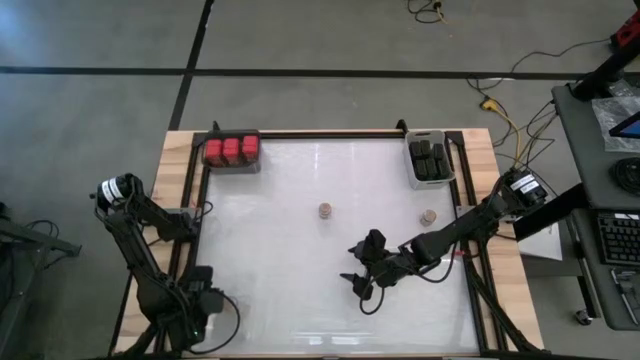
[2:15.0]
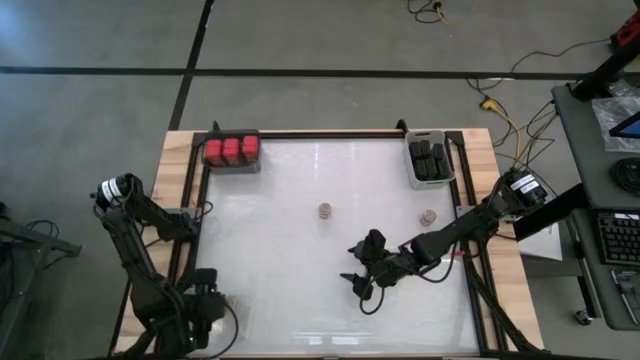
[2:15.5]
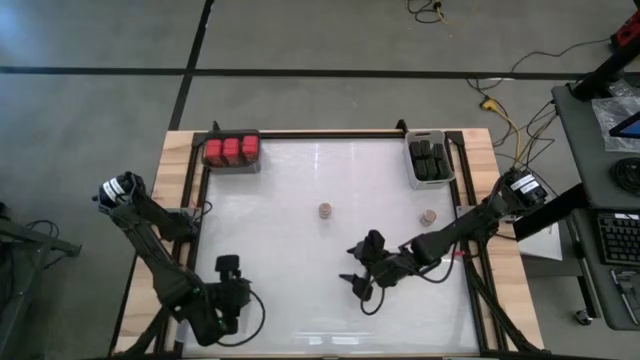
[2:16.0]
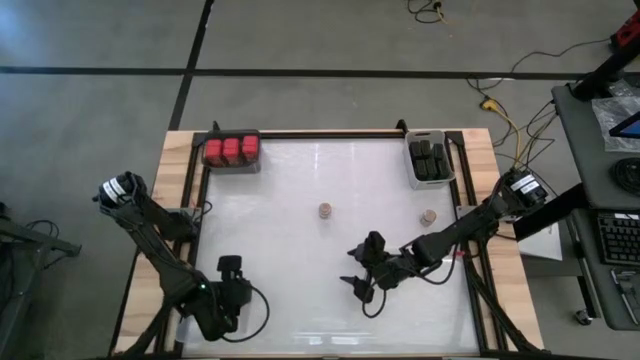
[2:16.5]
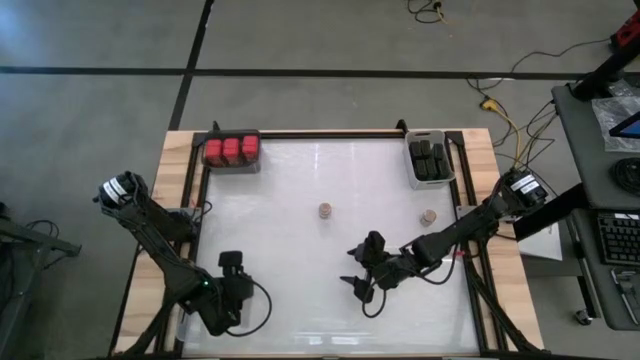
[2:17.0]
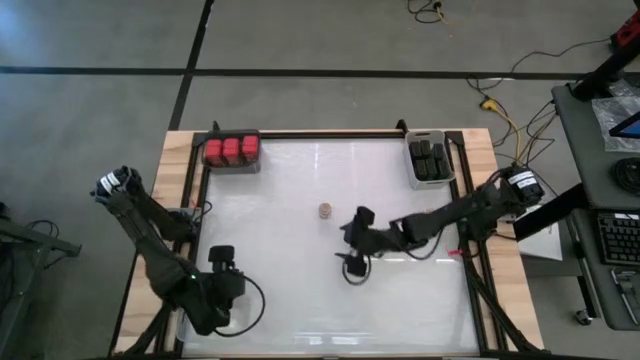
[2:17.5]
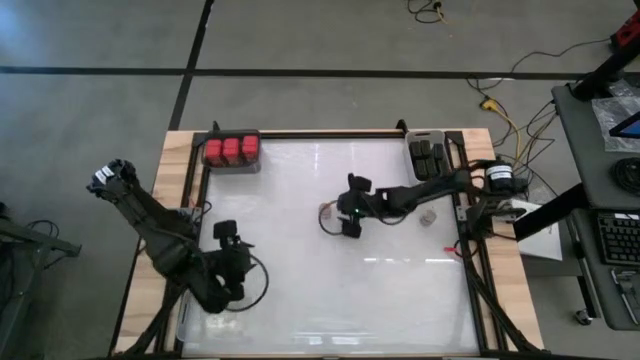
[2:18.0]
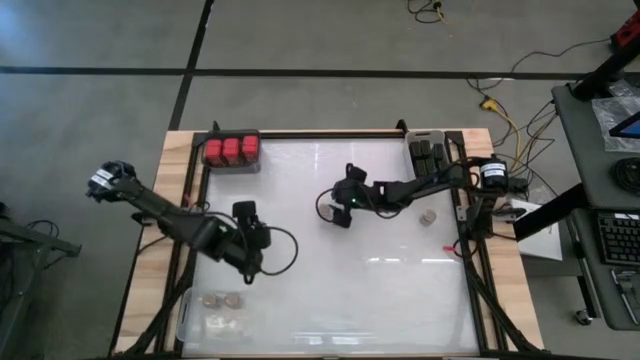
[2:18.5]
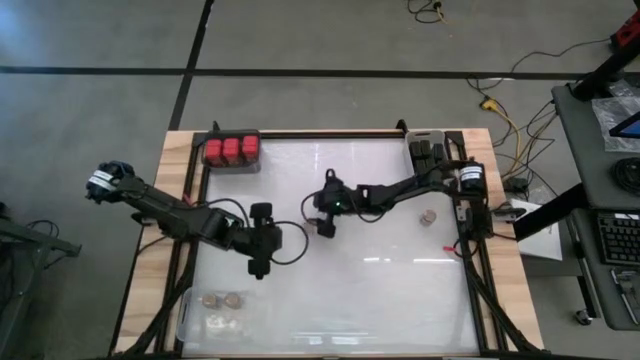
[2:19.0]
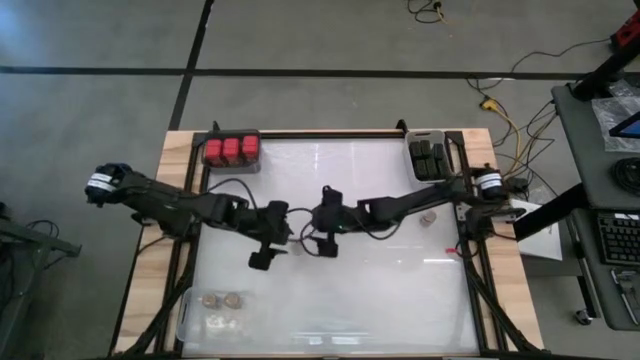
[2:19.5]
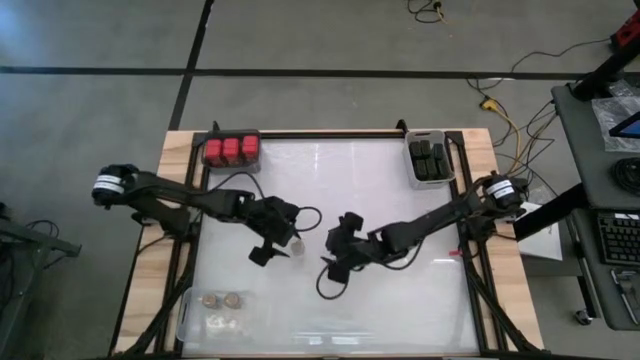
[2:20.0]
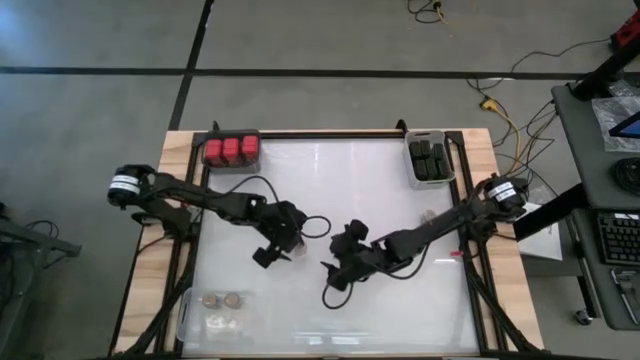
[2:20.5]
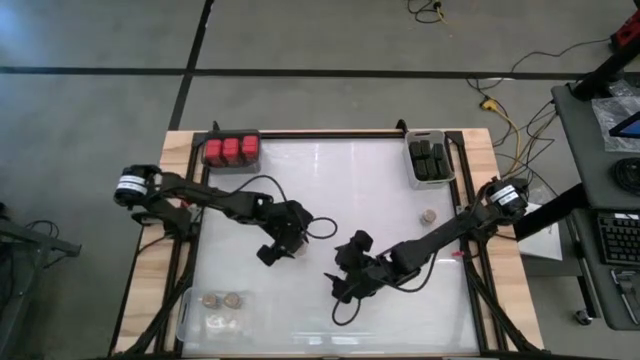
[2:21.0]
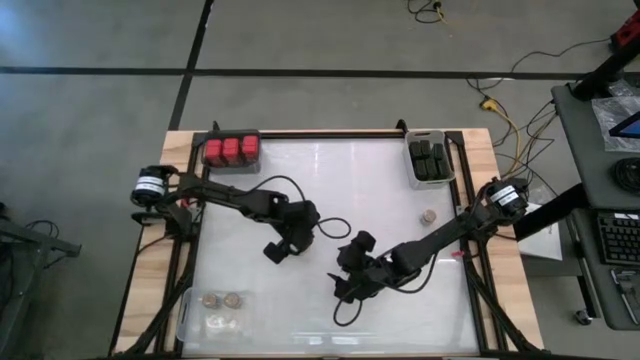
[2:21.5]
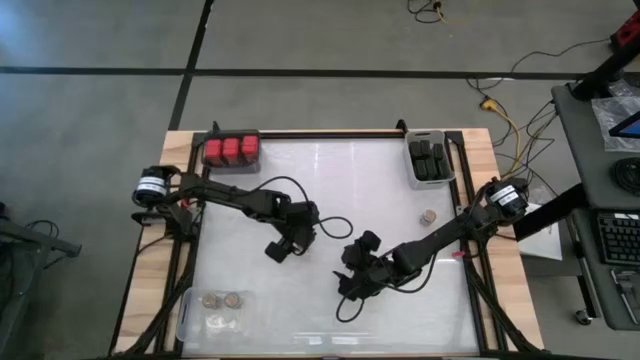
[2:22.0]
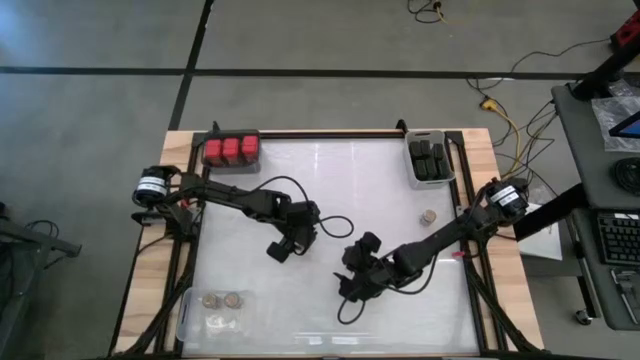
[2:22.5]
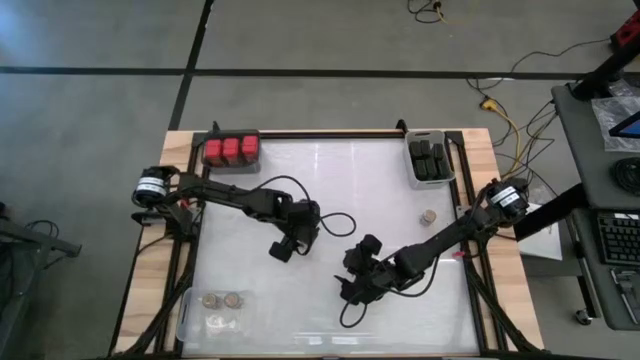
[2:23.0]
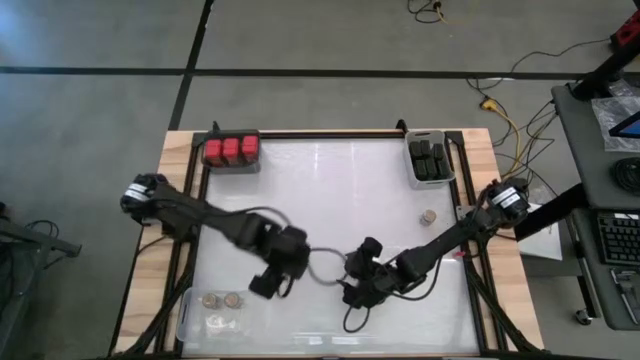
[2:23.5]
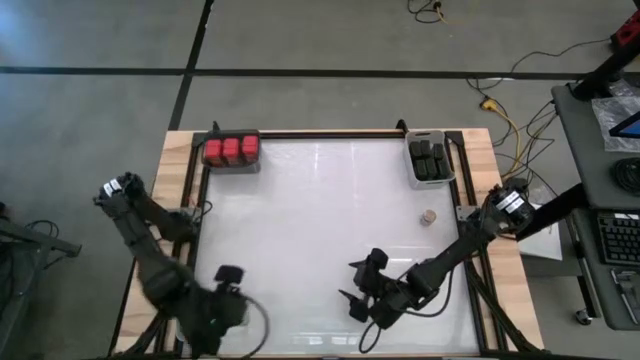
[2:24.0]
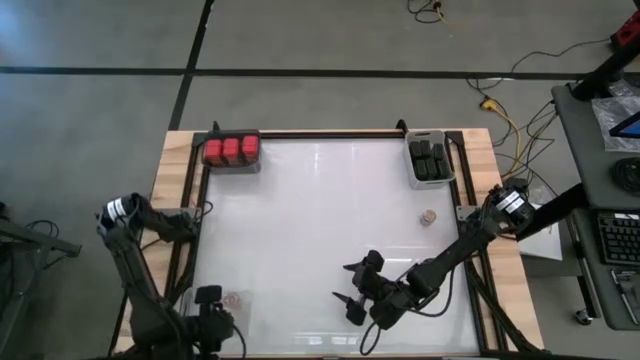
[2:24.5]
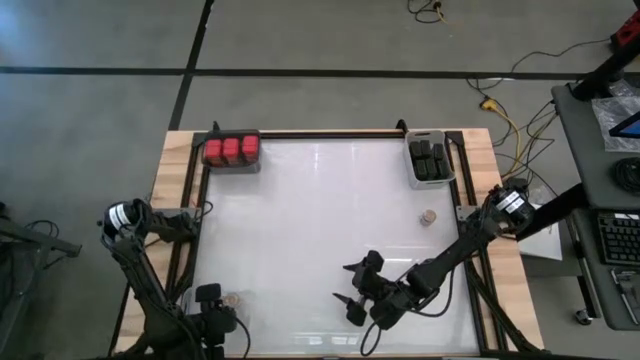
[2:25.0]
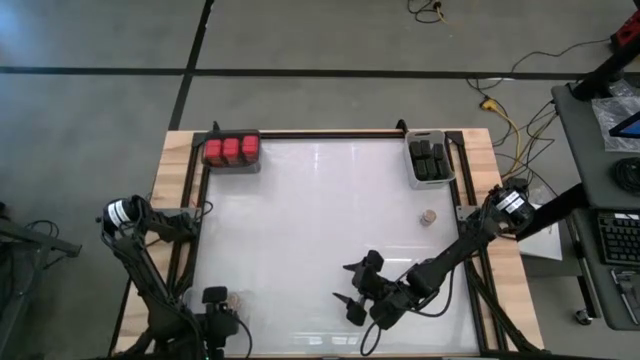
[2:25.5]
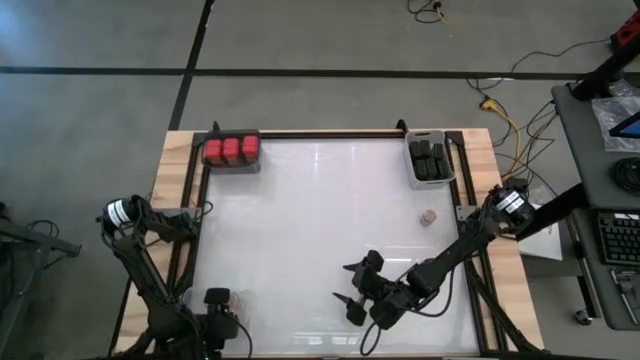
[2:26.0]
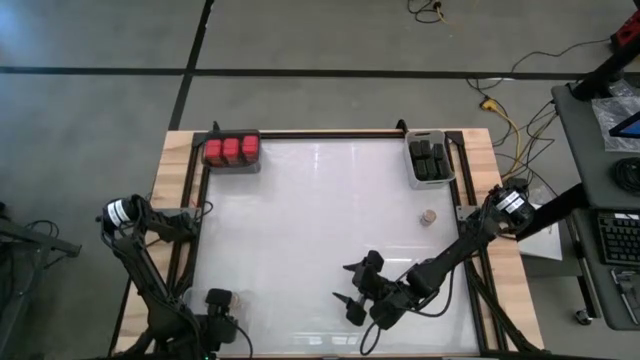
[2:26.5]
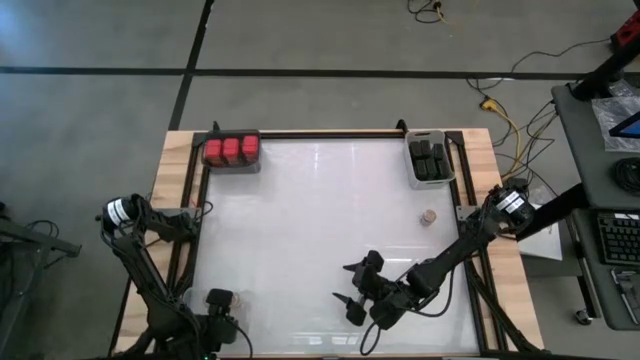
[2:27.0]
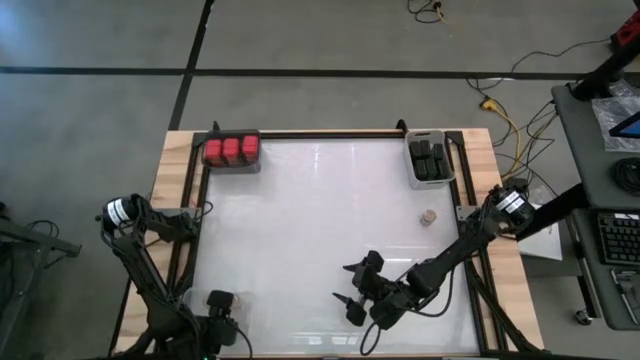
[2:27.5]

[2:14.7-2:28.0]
Task: Sort spices by type
Put the brown seasoning bottle into the transparent bin

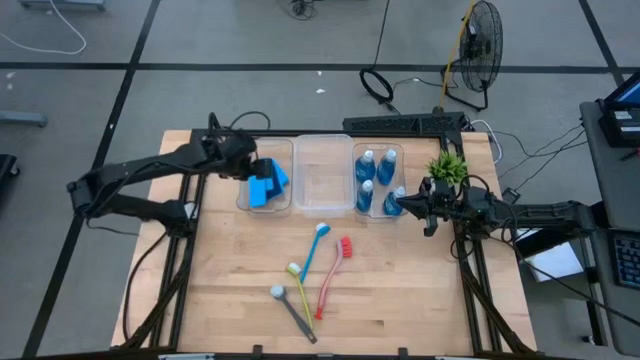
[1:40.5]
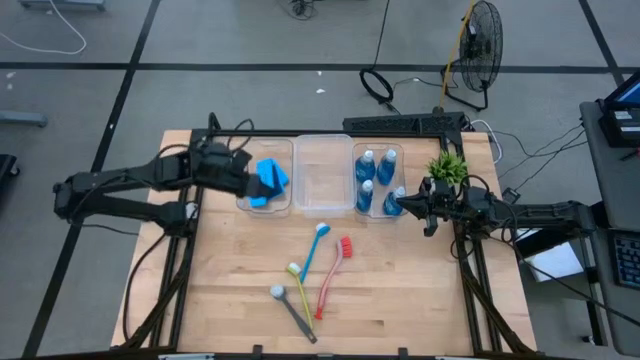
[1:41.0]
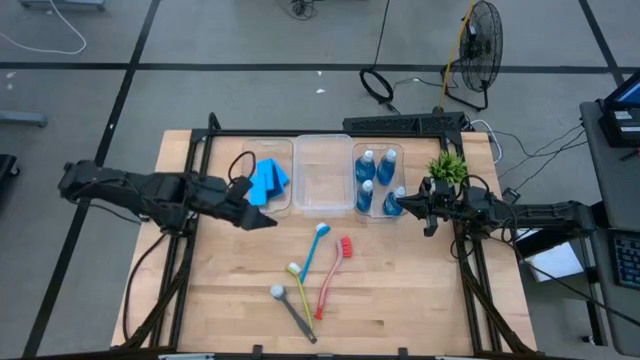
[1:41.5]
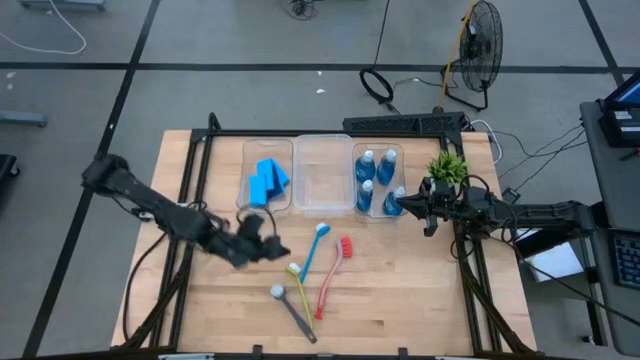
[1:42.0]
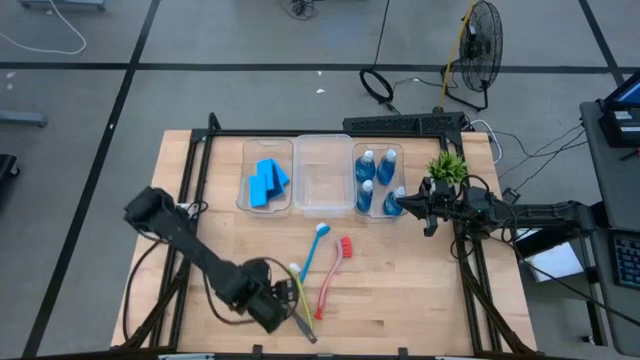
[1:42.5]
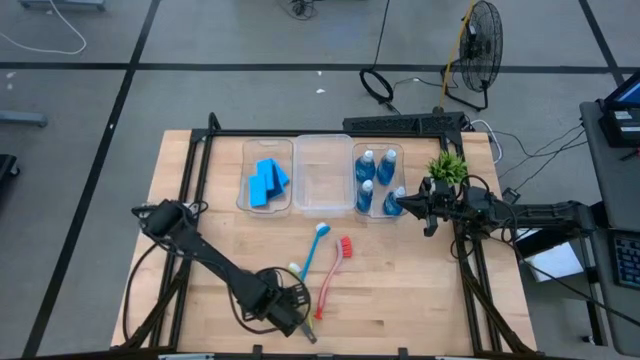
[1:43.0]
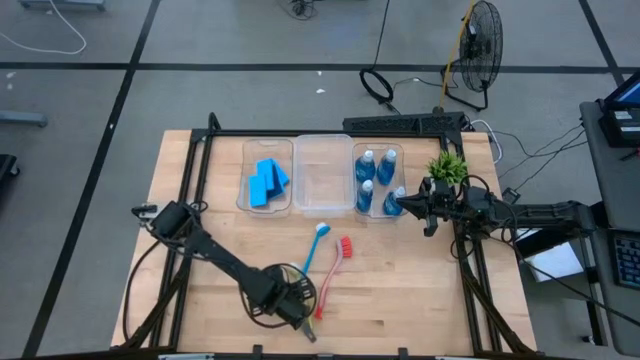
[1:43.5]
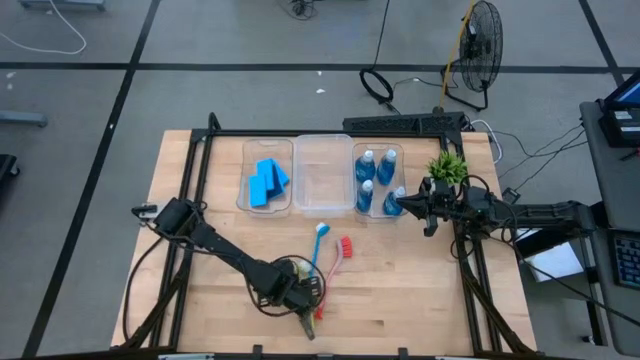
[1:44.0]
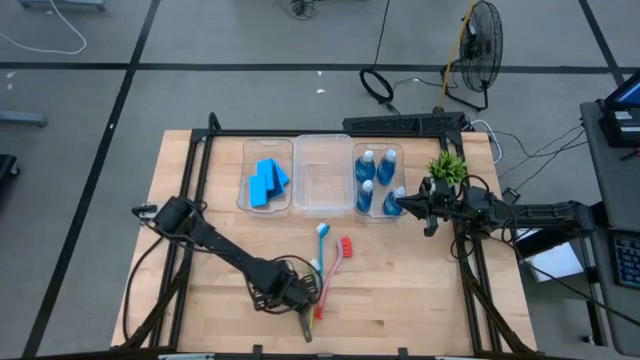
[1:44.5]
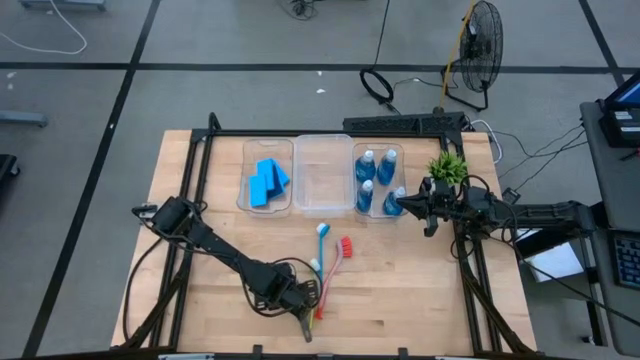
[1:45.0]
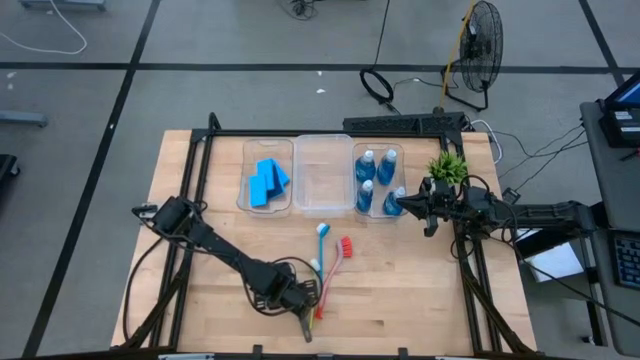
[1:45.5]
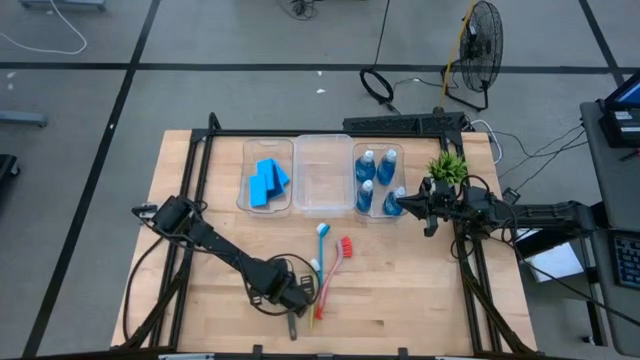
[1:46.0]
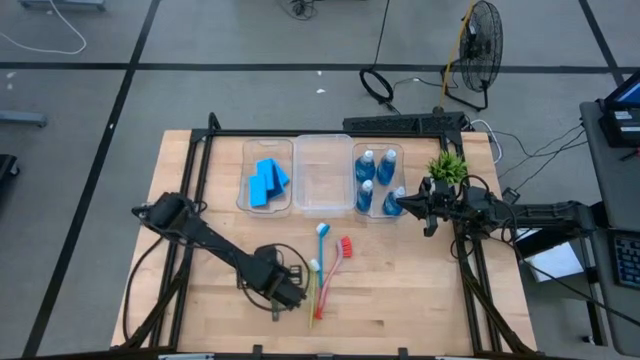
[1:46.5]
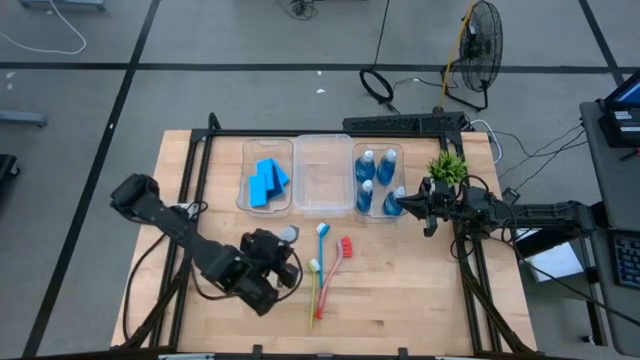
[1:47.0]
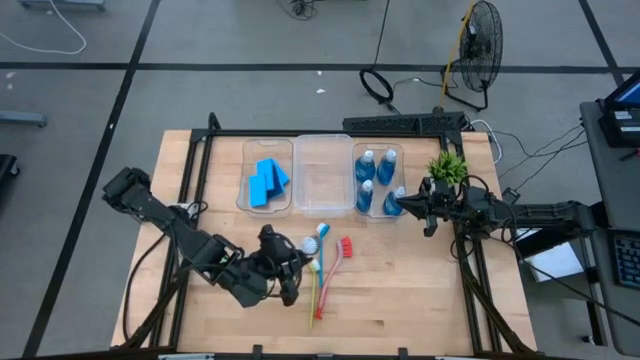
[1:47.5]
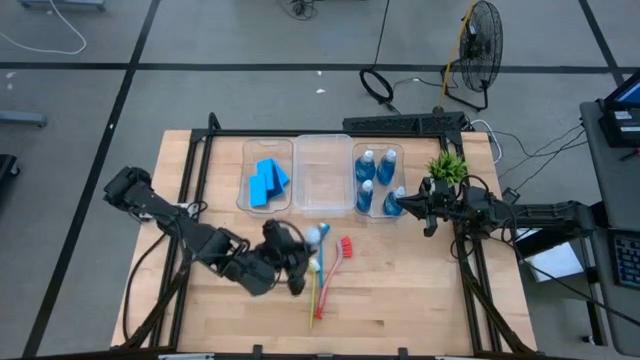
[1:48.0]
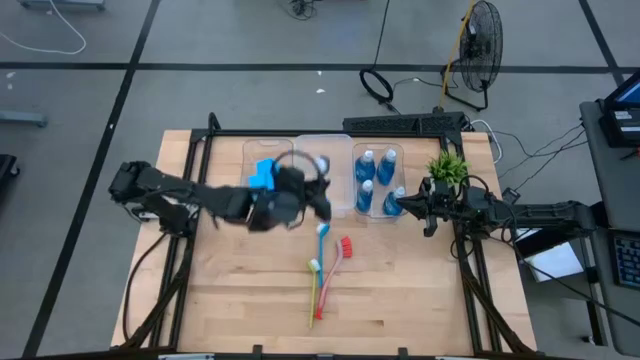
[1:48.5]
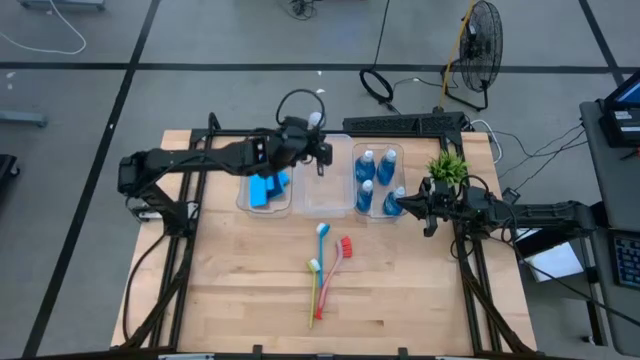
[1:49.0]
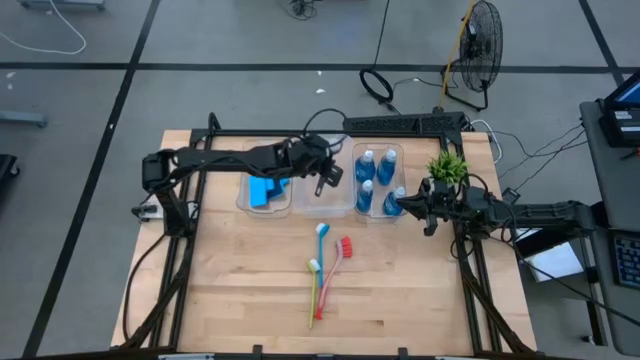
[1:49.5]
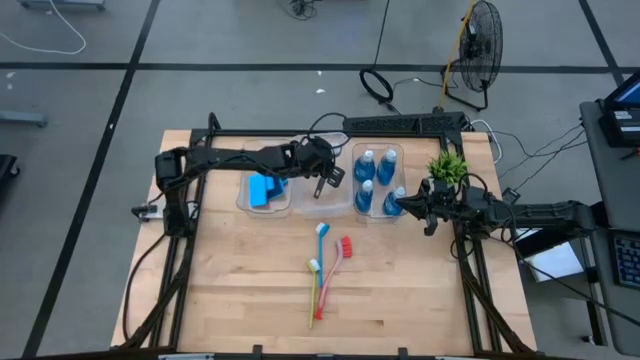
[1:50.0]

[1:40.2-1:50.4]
Task: Pick & Place Kitchen Sink Supplies
Put the black dishwashing brush into the white bin
